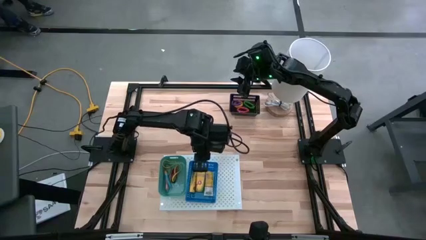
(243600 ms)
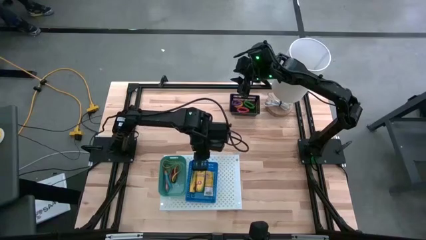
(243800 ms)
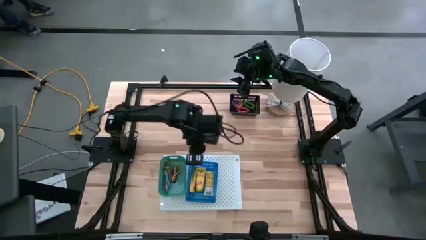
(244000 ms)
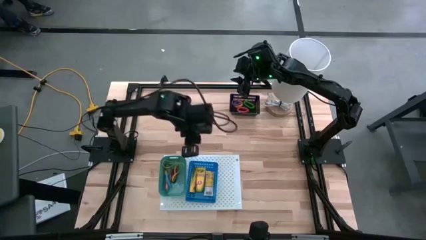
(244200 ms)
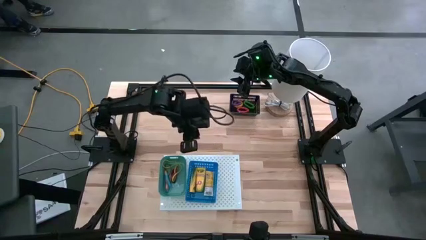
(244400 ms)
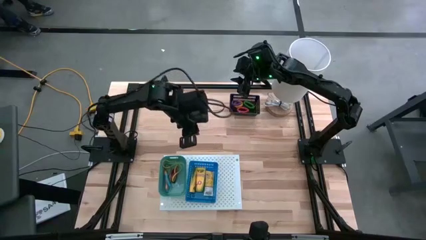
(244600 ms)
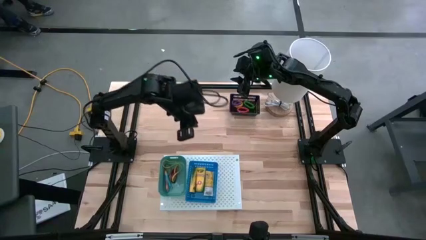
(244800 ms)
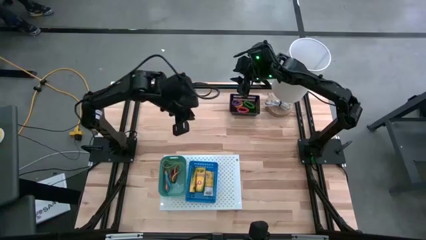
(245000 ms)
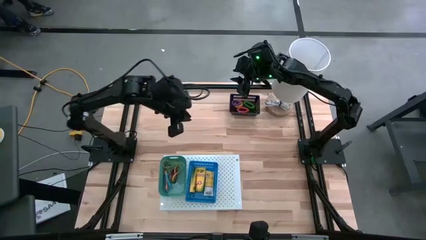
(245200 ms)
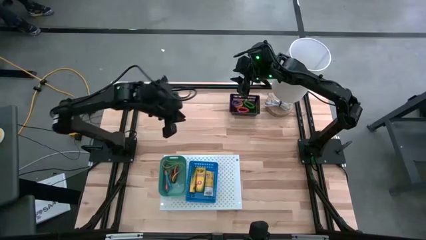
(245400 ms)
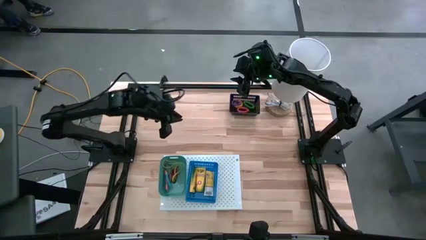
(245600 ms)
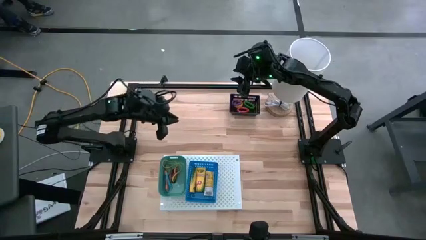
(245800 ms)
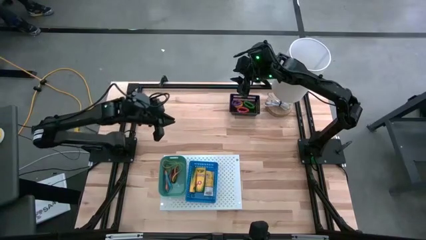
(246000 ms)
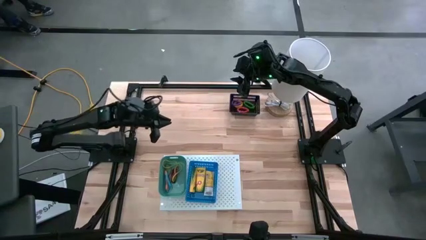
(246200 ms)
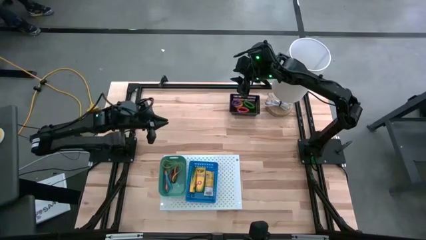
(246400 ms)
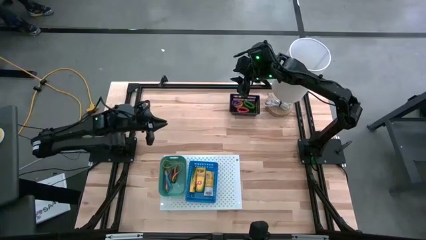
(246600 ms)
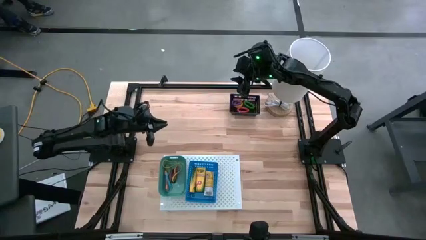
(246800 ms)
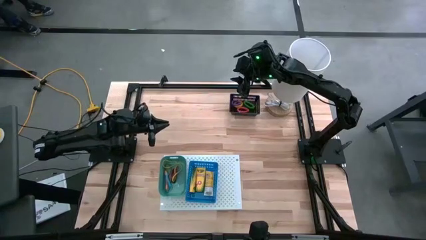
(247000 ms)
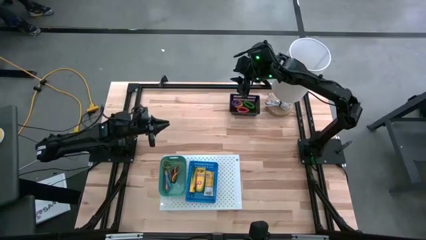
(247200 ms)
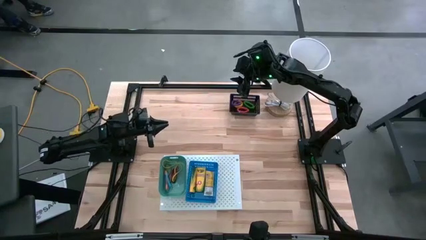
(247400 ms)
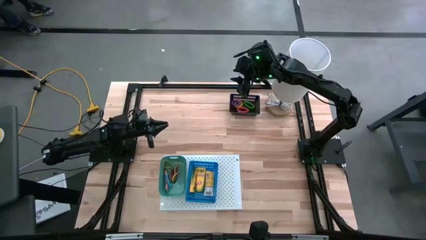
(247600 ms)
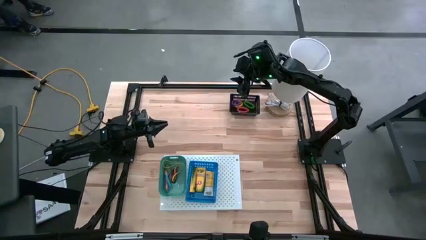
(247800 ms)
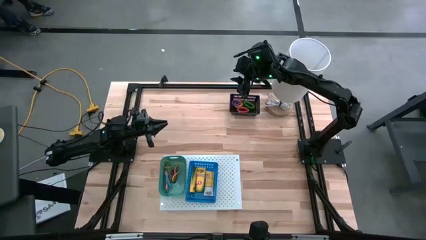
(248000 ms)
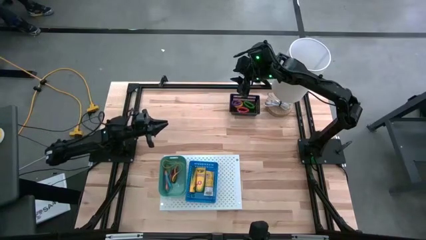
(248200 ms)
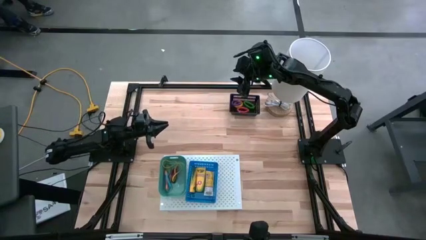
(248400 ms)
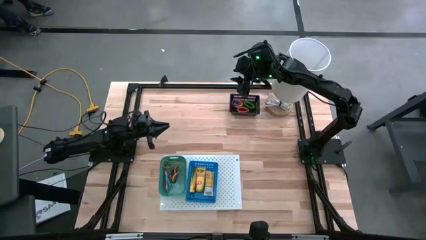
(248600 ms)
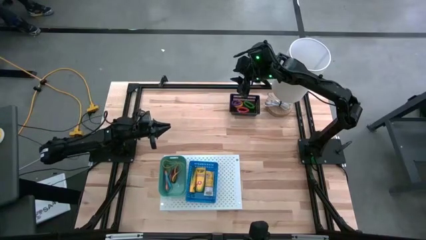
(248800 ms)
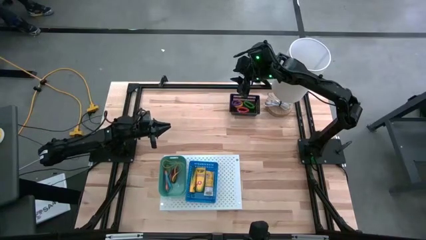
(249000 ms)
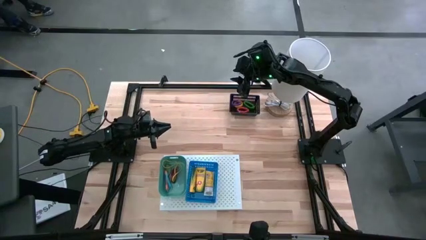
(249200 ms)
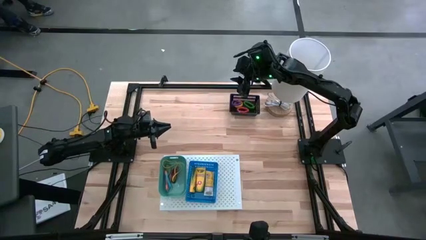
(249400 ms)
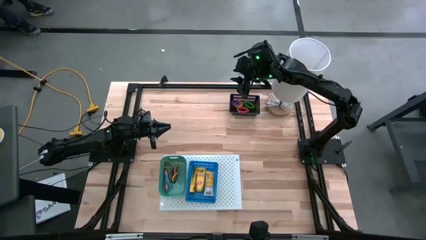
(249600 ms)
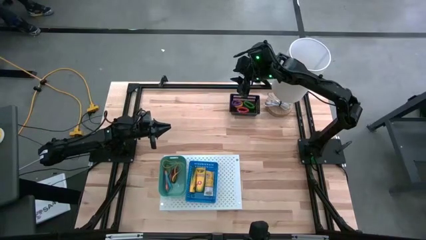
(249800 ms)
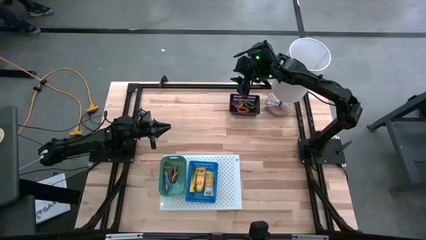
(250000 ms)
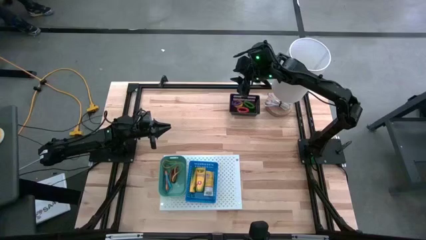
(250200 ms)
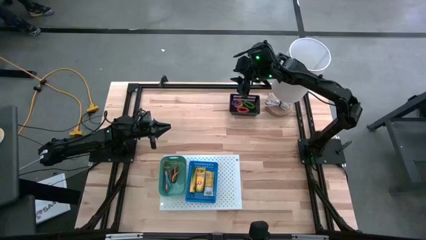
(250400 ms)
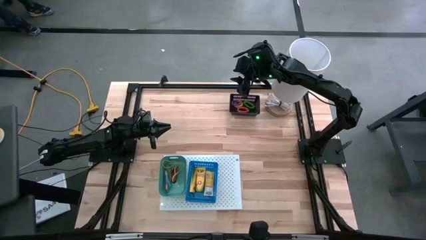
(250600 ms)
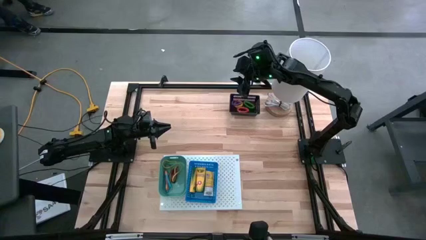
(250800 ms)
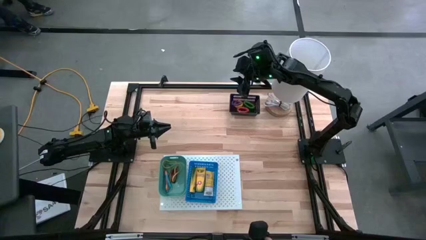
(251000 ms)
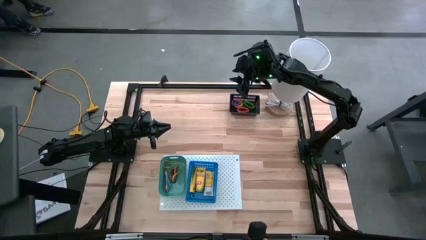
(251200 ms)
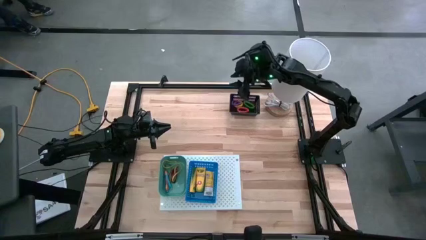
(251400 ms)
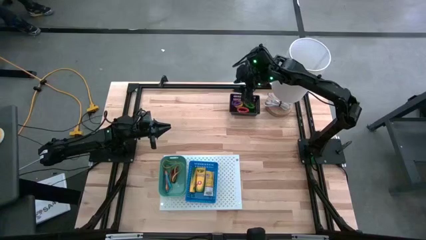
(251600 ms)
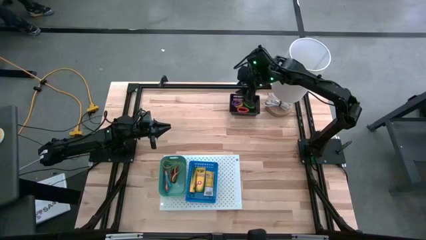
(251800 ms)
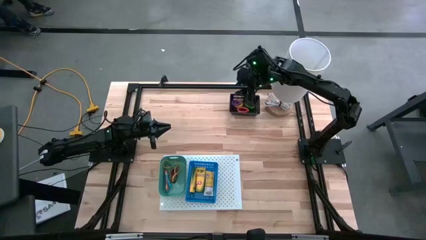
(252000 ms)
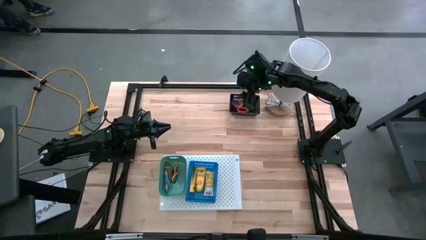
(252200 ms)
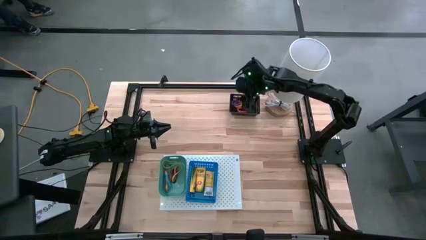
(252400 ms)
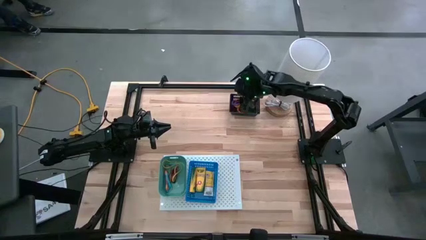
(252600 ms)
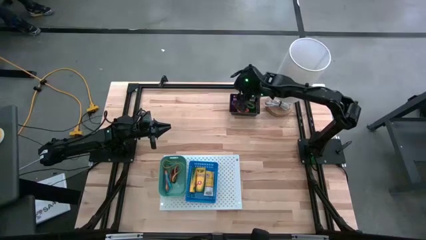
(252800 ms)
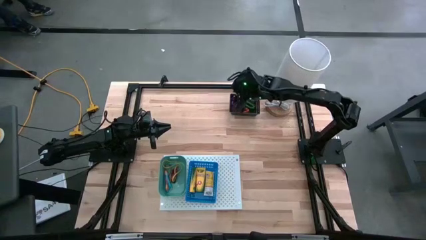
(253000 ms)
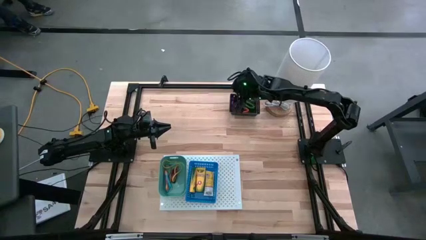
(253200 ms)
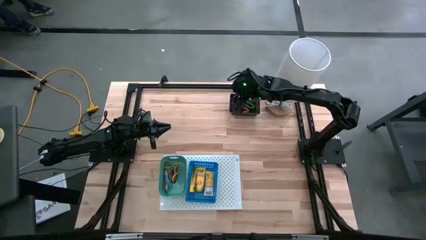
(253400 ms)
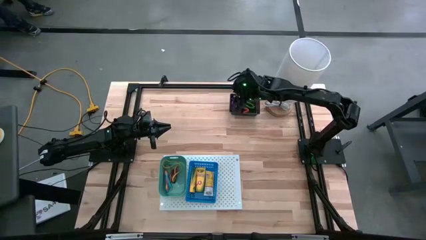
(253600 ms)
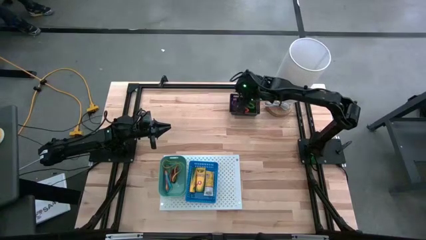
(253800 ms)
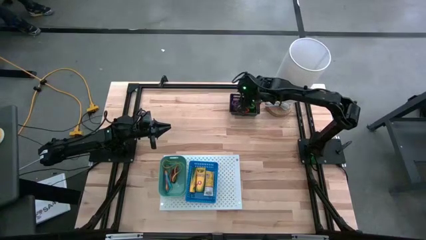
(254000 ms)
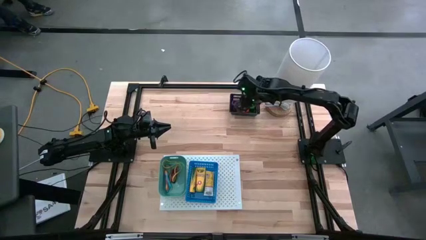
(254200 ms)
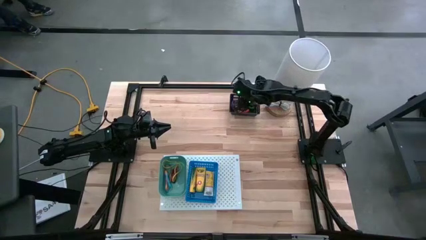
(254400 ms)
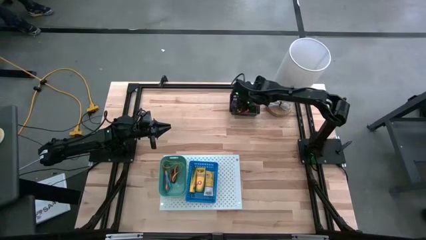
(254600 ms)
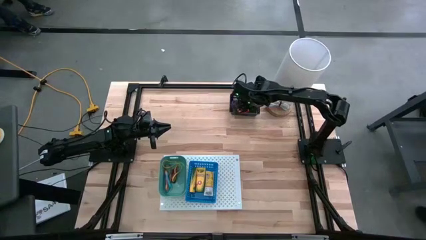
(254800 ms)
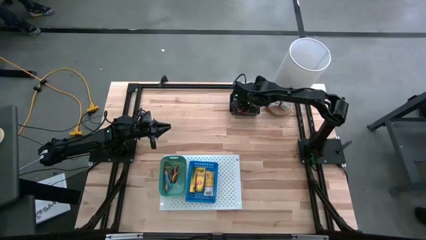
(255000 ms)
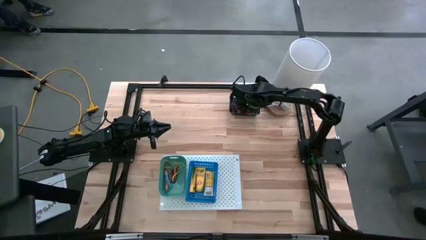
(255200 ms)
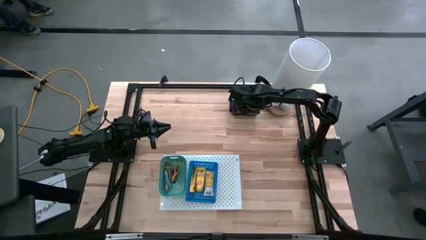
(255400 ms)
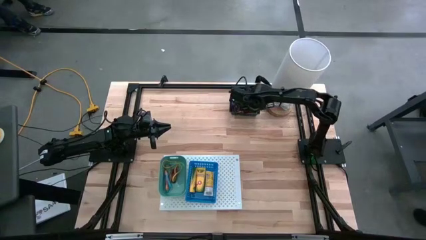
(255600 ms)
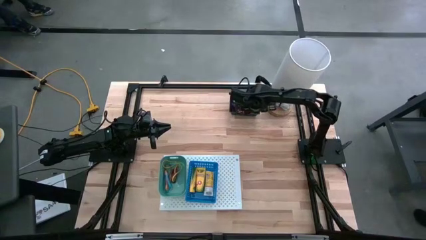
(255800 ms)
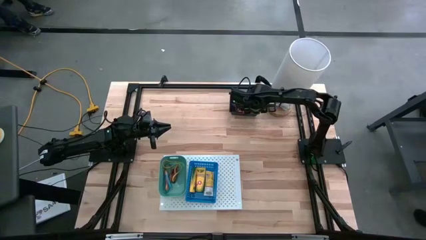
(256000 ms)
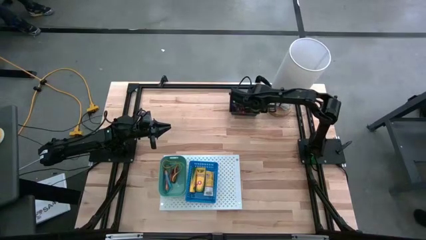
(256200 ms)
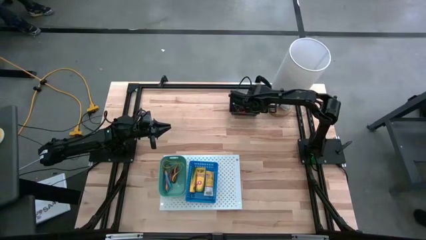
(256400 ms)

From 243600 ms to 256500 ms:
Task: Pick & Place Office Desk Supplies
Put the black bin on the shelf
